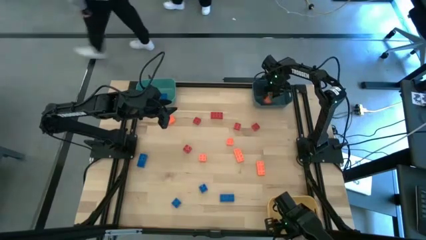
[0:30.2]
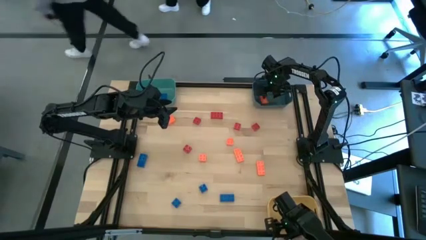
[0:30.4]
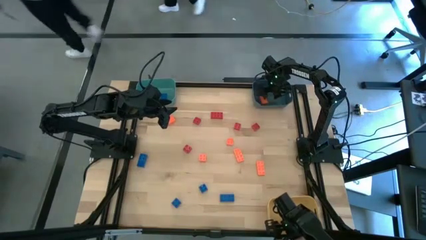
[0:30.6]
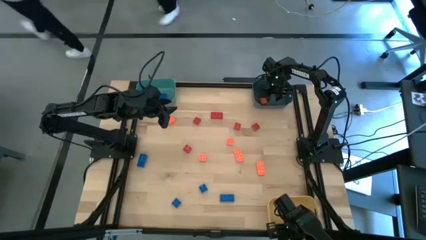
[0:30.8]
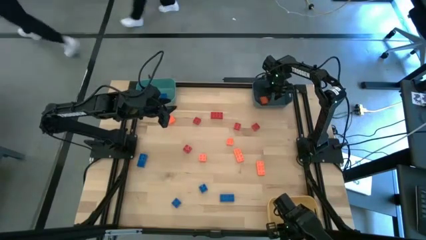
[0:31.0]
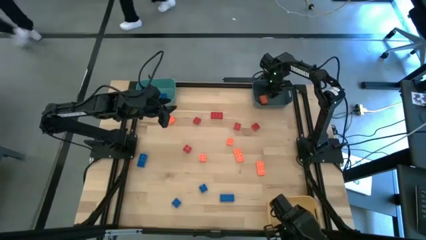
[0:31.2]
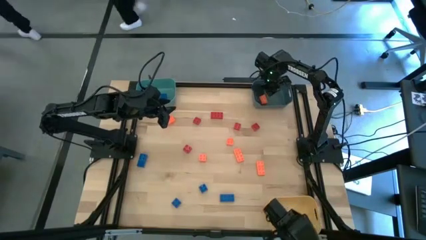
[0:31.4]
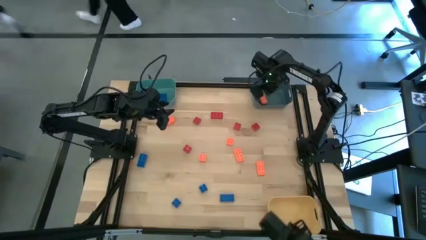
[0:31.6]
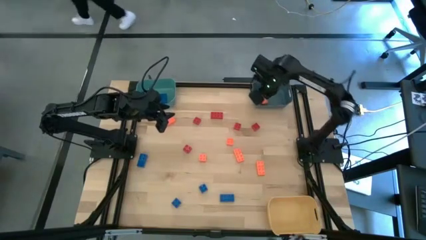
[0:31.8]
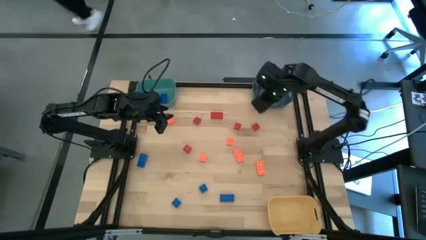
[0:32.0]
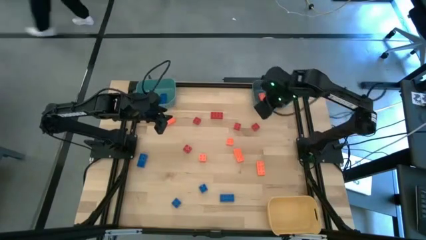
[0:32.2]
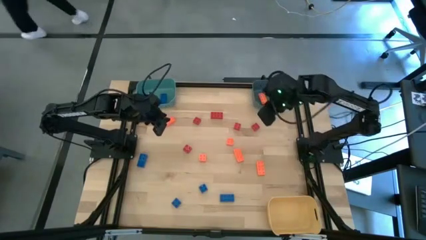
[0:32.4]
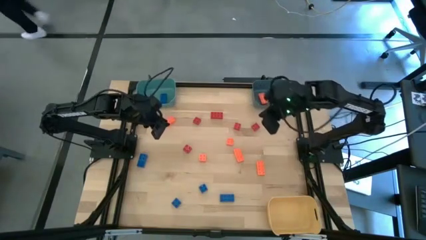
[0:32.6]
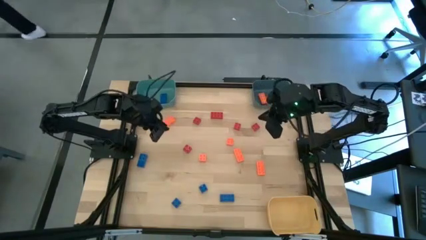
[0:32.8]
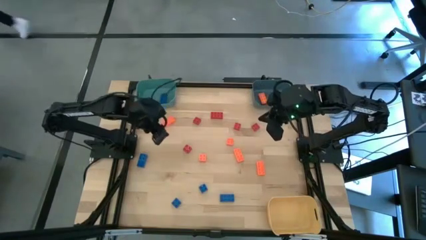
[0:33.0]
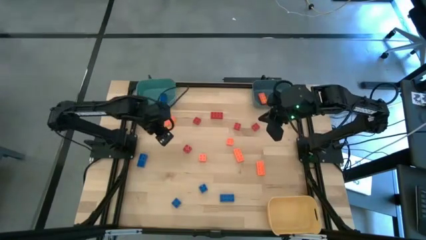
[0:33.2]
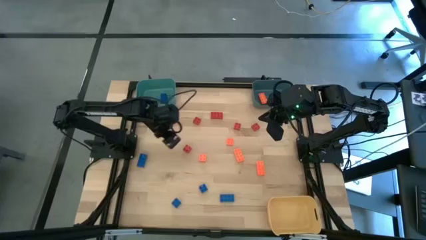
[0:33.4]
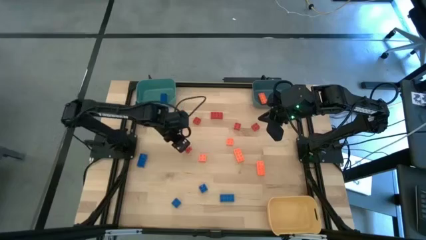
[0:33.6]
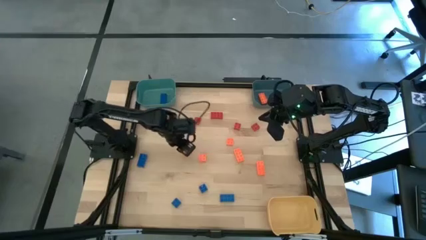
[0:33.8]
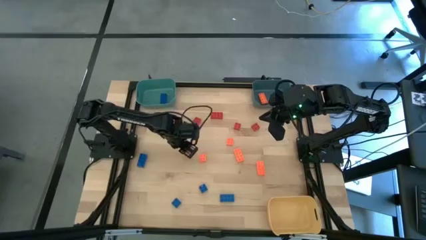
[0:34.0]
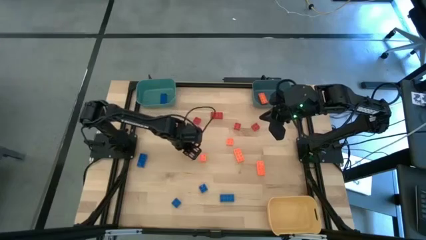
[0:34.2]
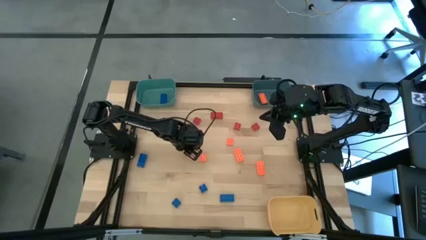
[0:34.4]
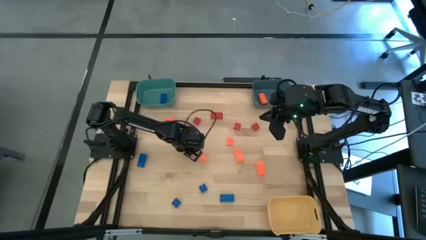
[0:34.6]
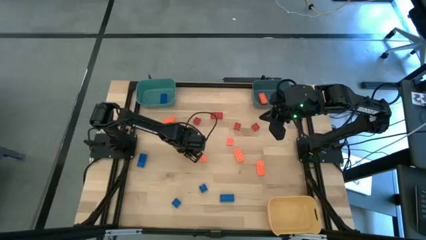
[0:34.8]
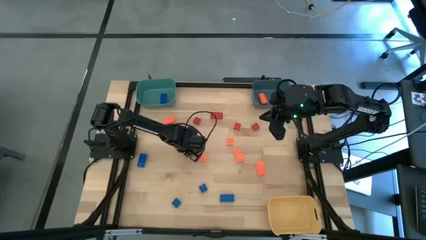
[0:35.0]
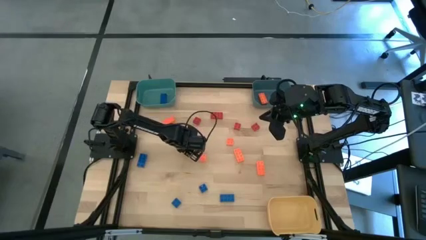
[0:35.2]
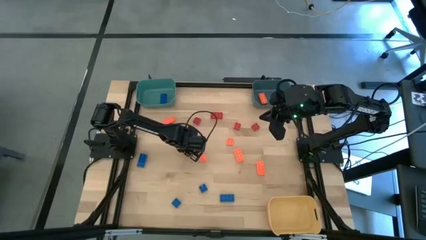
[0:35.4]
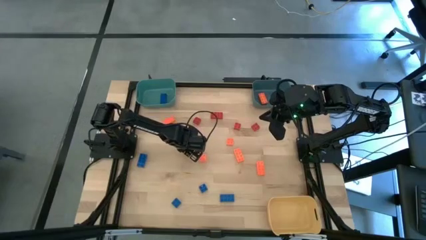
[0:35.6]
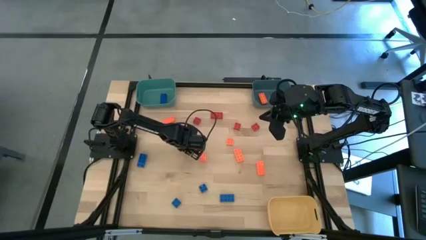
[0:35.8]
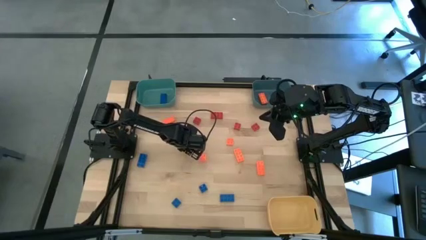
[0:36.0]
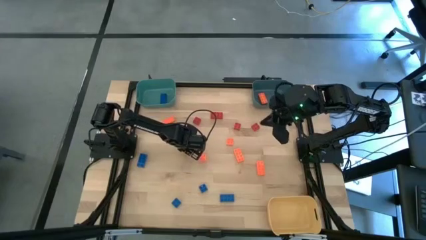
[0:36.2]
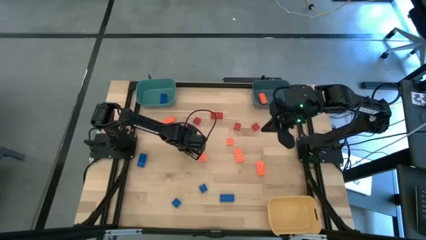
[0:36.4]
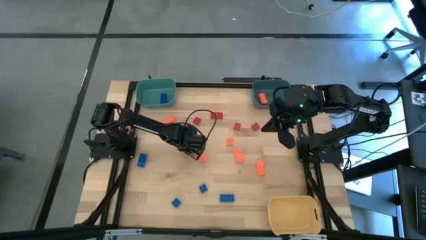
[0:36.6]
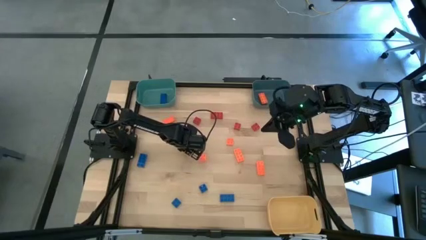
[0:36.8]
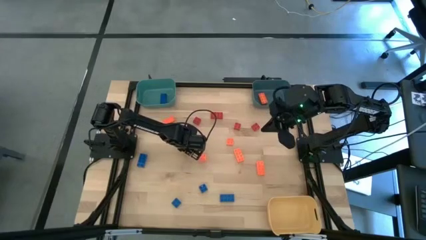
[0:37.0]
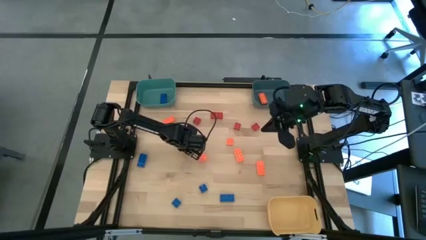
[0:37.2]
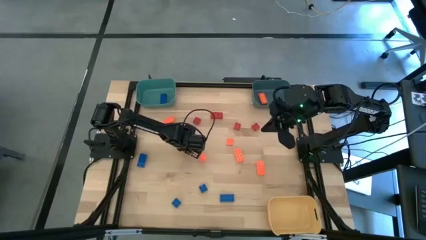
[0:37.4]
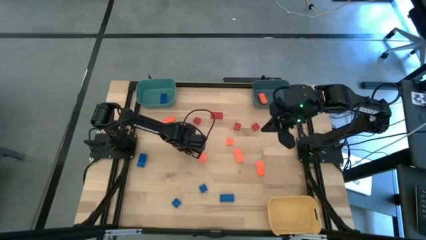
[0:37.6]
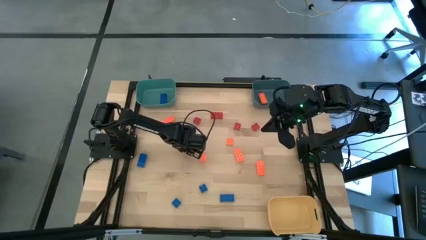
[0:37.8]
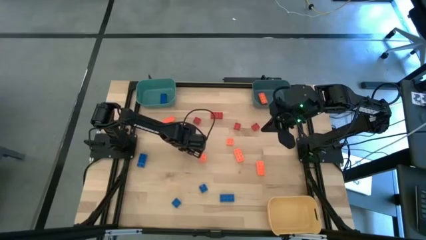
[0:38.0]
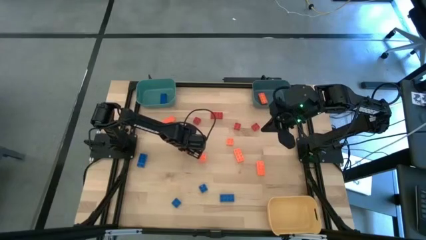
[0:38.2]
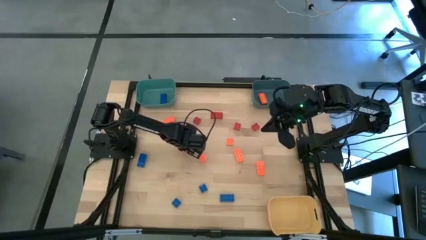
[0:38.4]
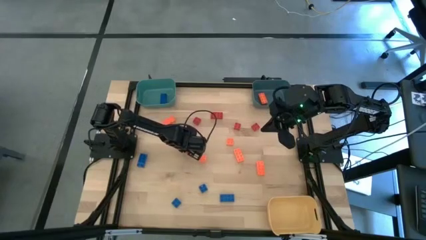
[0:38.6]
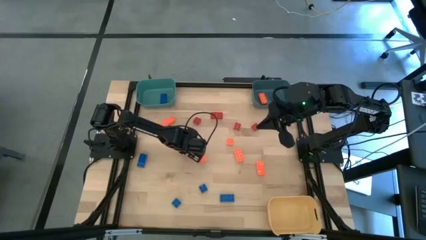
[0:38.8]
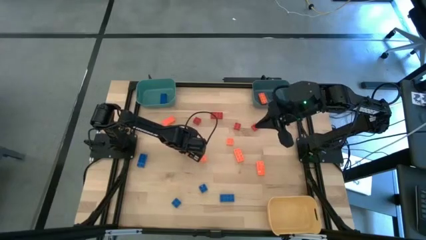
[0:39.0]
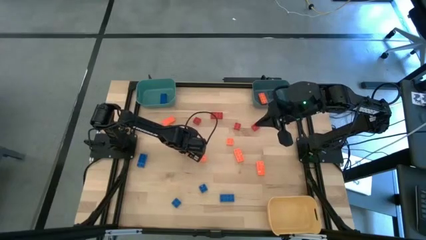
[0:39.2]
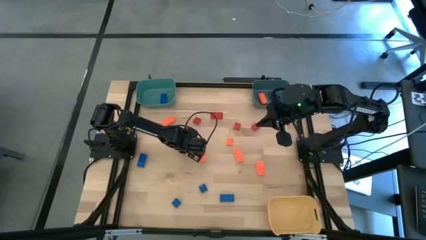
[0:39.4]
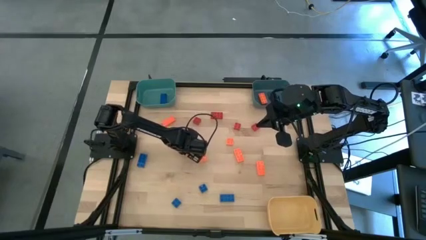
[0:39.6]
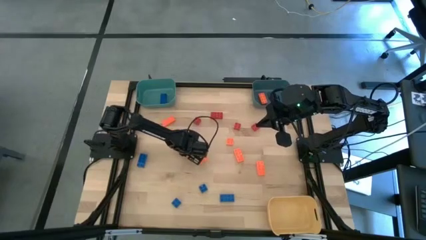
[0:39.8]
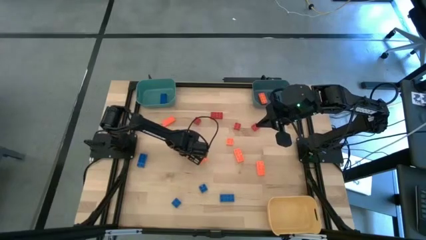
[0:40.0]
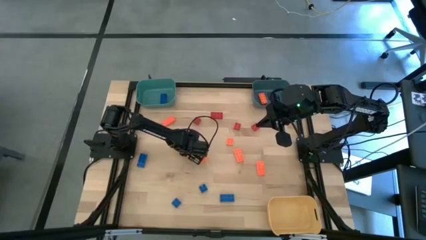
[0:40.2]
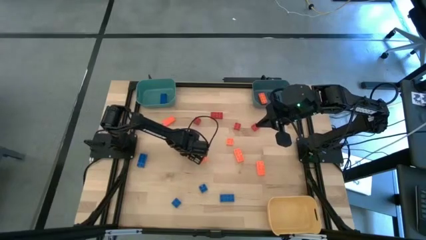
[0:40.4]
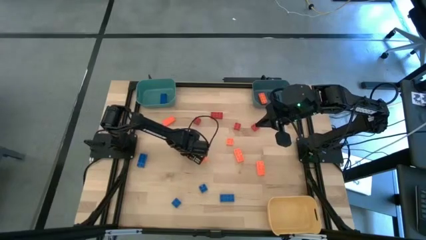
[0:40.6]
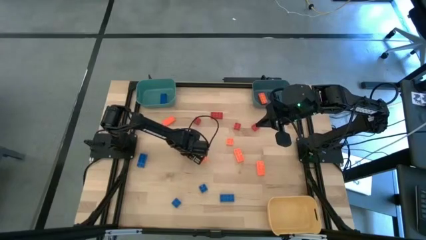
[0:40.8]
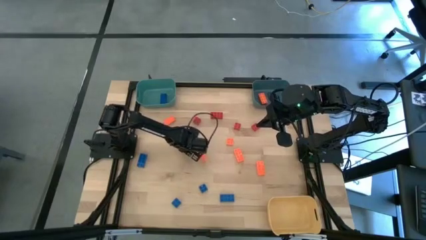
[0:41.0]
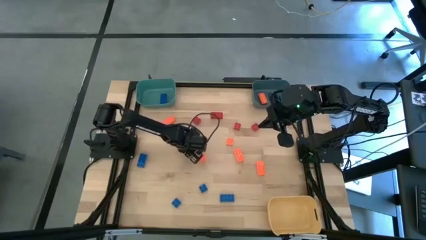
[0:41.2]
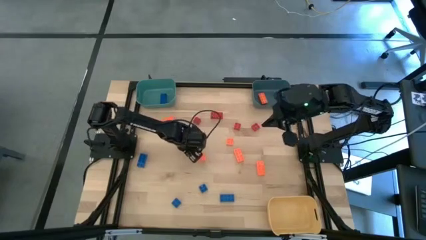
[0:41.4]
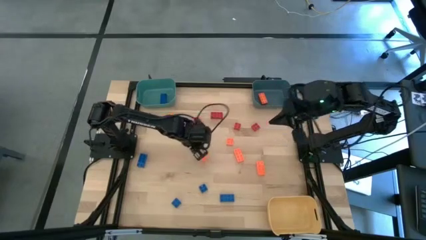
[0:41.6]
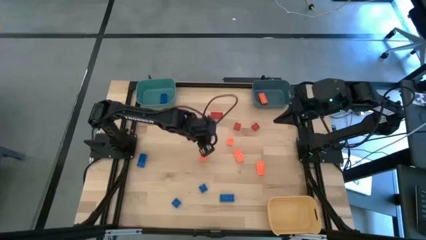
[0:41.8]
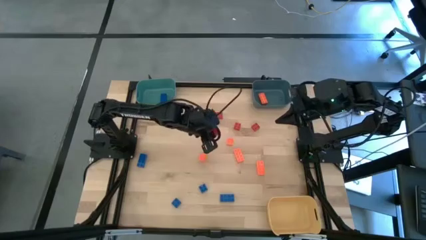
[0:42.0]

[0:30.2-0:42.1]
Task: Sort & place blocks by color
Put the red game piece into the yellow bin
